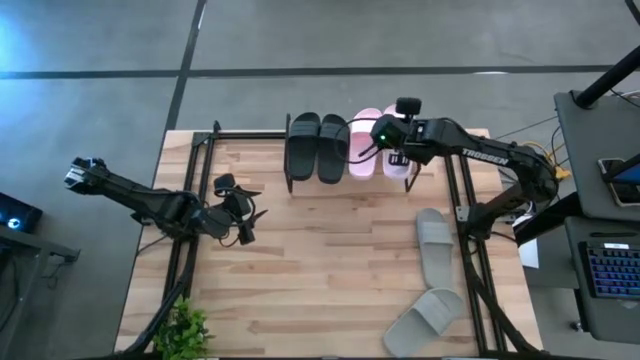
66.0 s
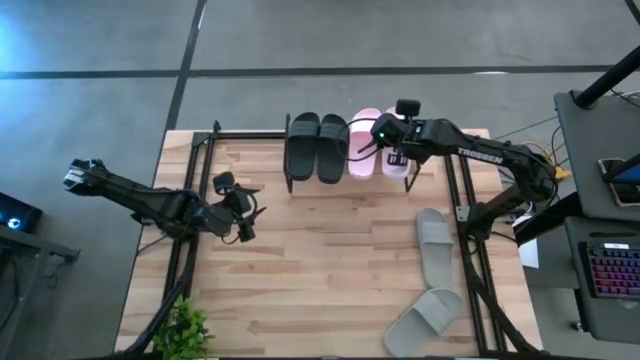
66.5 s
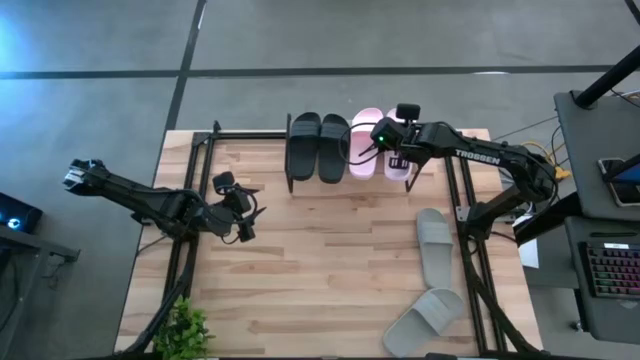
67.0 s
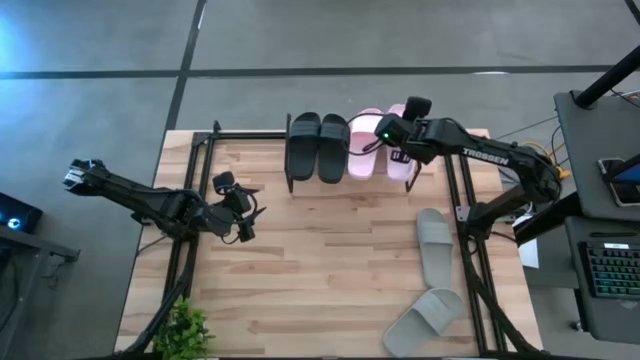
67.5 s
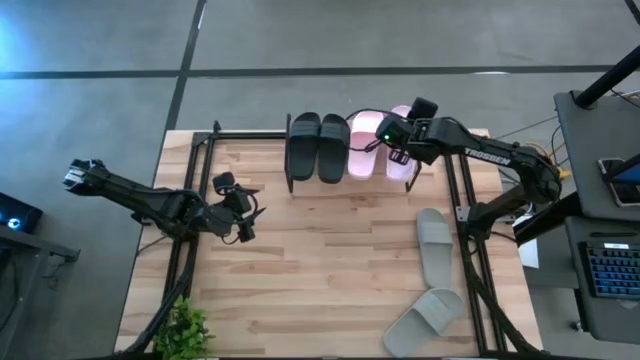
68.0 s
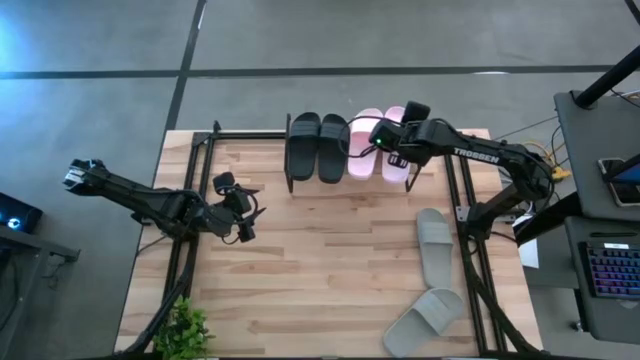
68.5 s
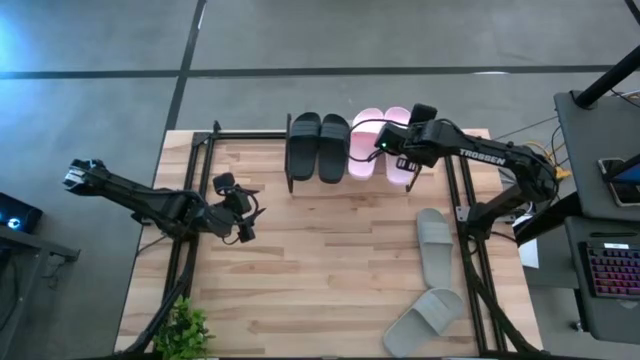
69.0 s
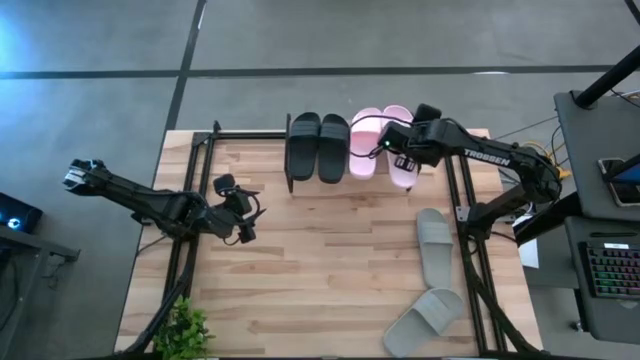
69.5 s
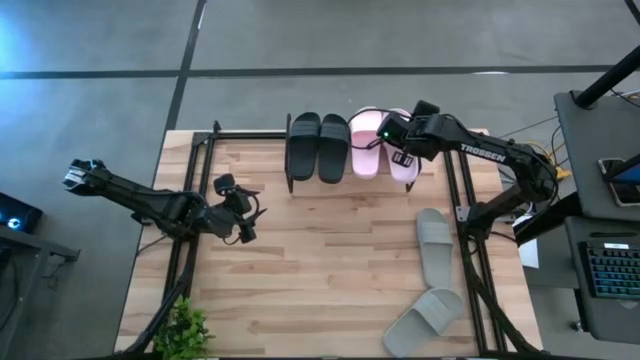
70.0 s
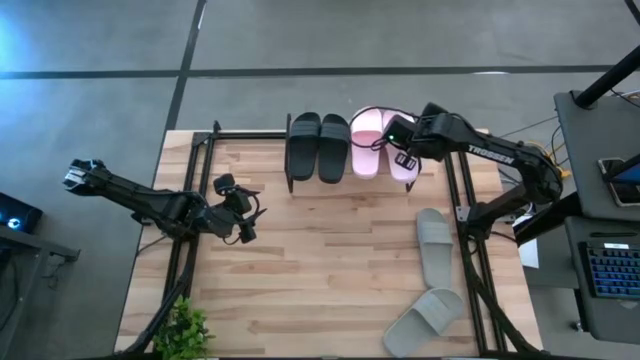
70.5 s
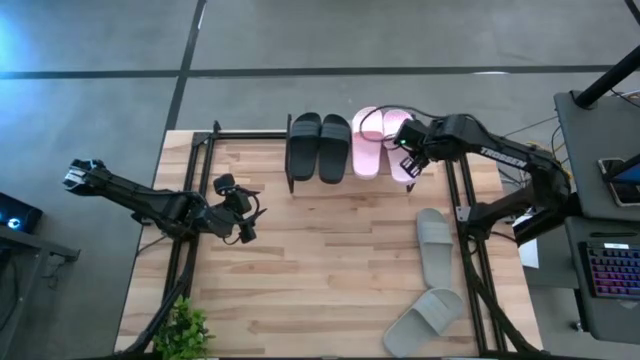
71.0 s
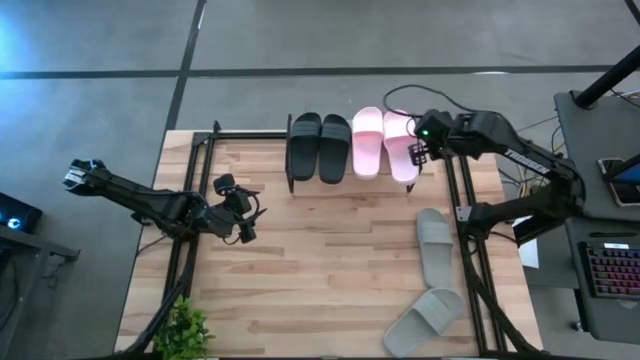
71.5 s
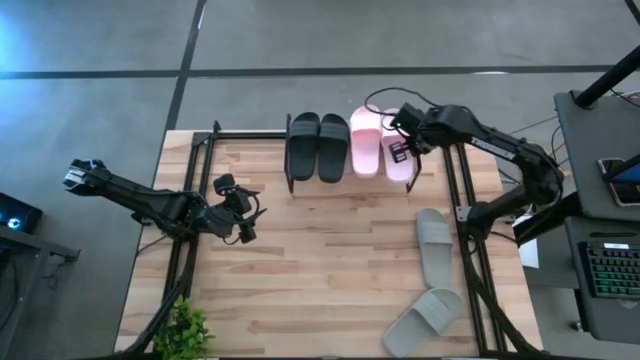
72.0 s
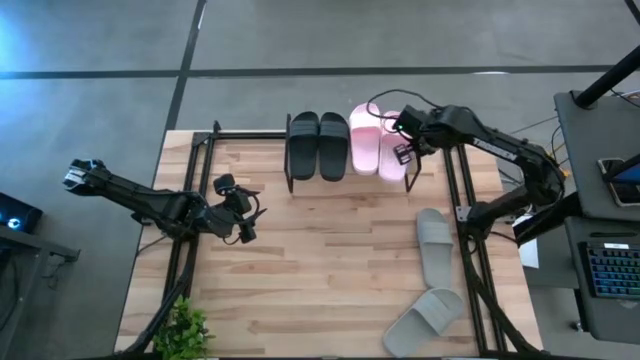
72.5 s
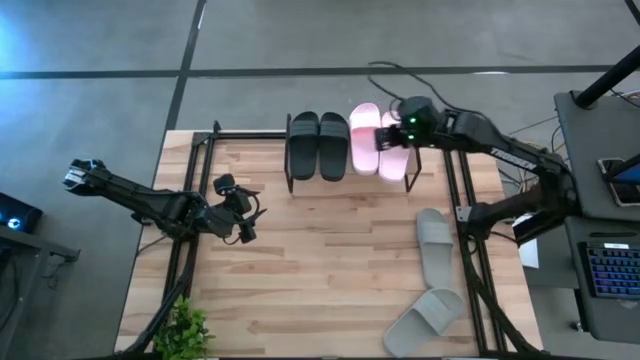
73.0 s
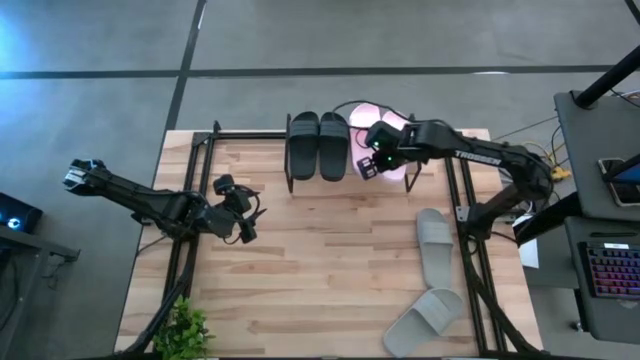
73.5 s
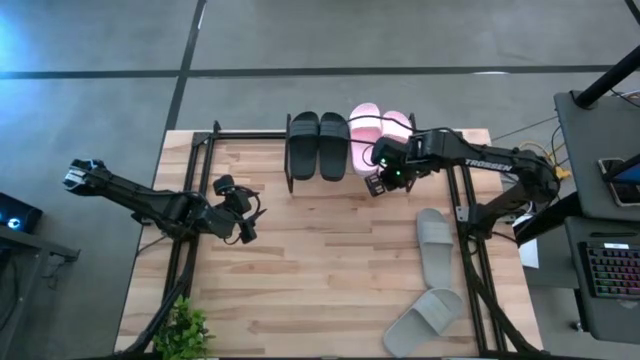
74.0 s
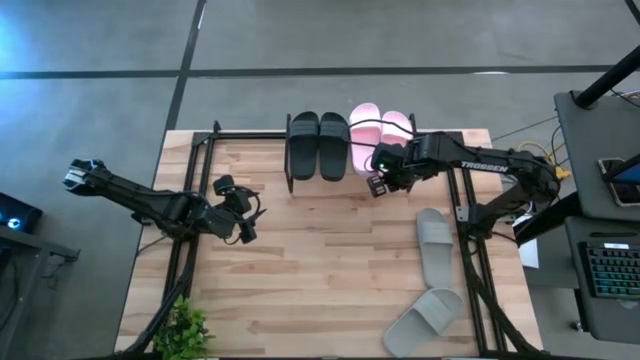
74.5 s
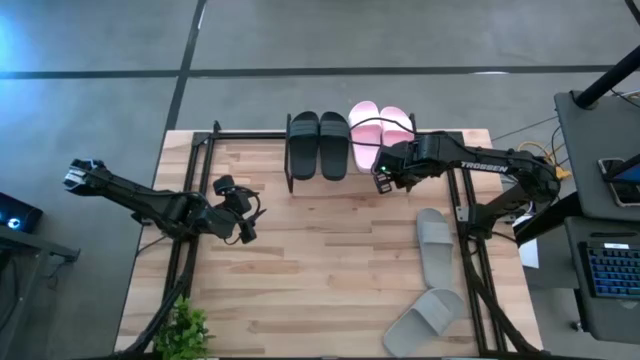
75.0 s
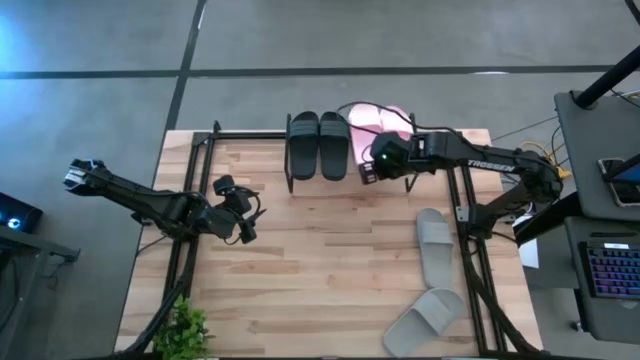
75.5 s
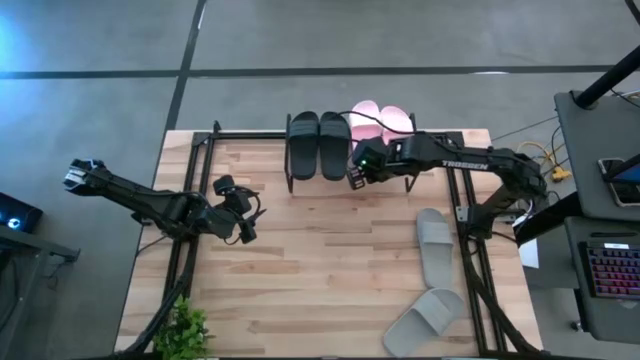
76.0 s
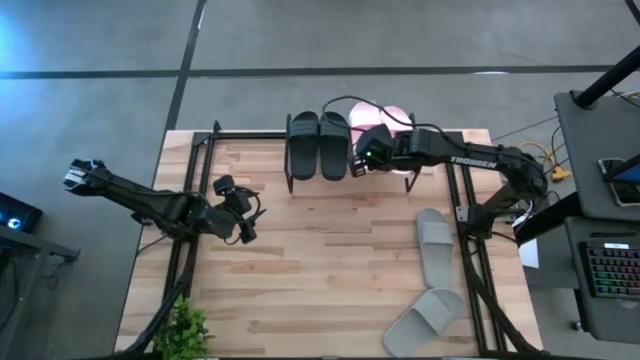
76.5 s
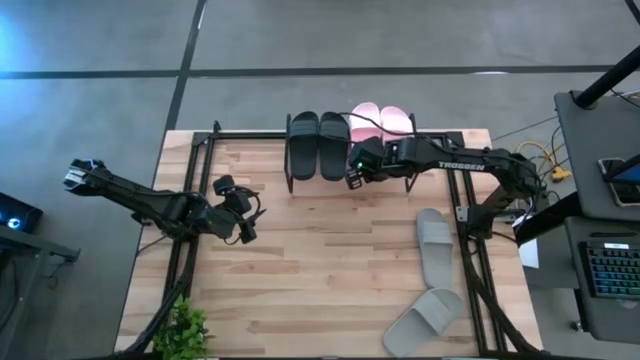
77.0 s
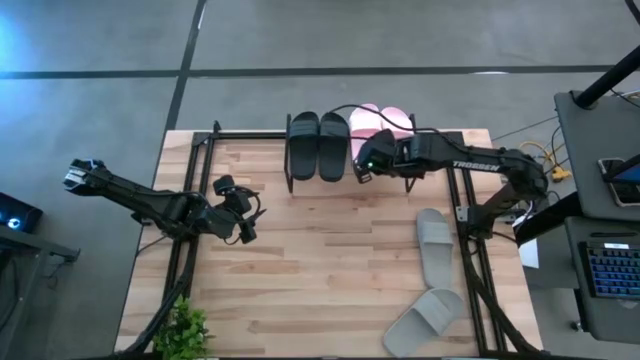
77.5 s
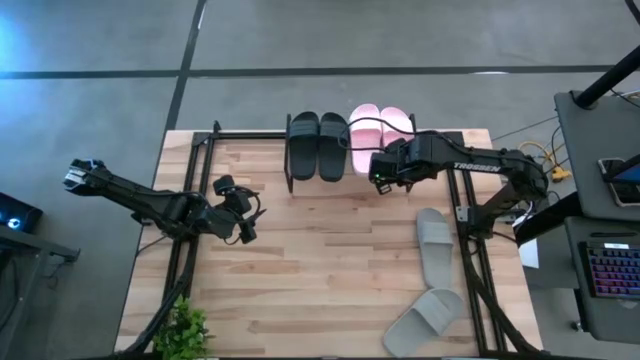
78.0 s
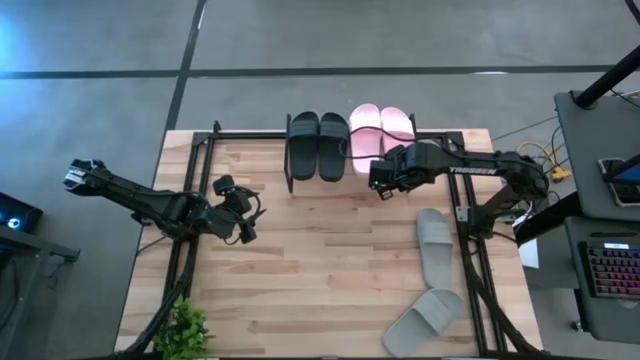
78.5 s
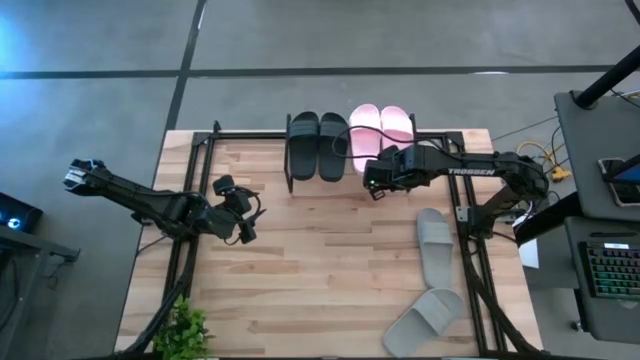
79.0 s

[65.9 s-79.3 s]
Task: Pick and place slides into the shelf
Put the pink slide on the shelf

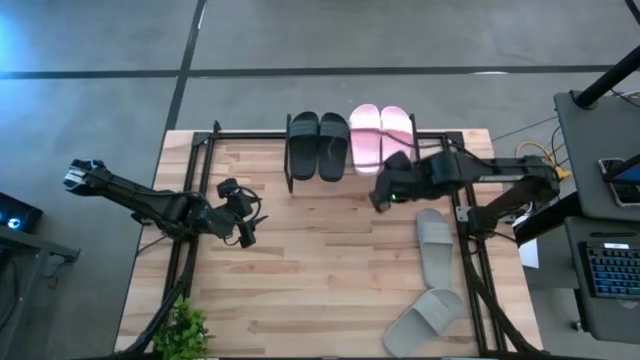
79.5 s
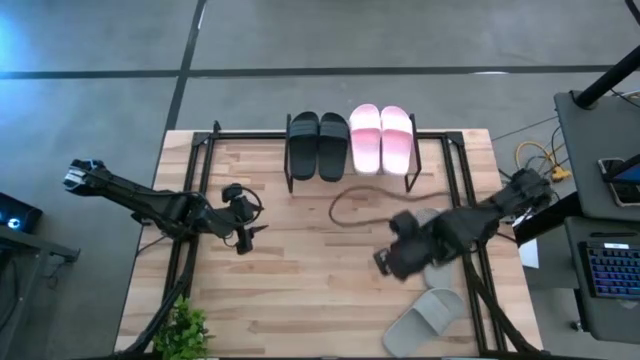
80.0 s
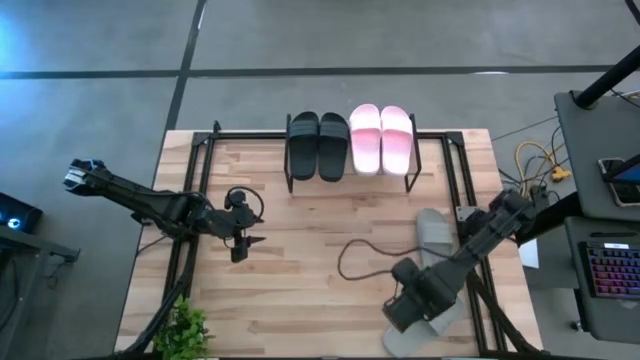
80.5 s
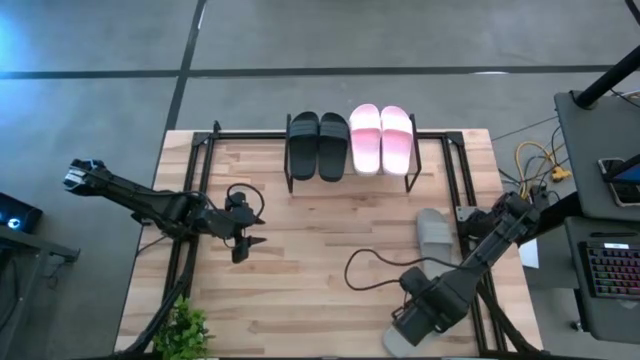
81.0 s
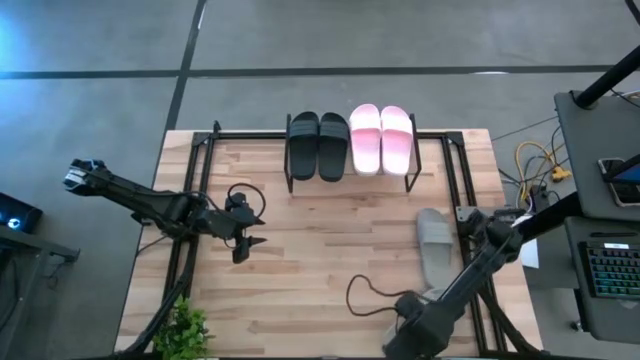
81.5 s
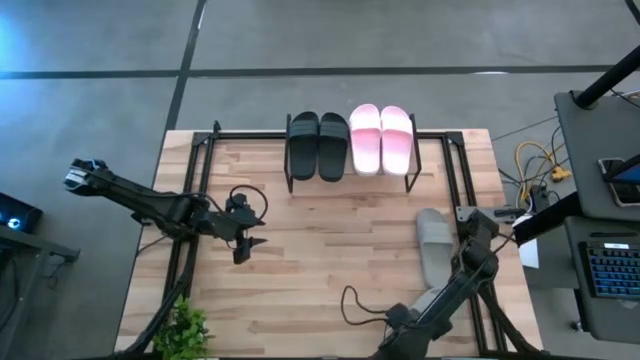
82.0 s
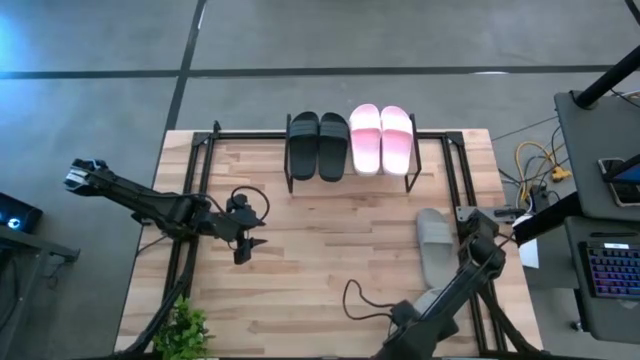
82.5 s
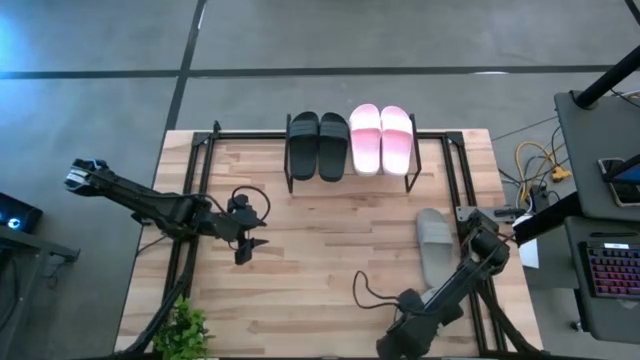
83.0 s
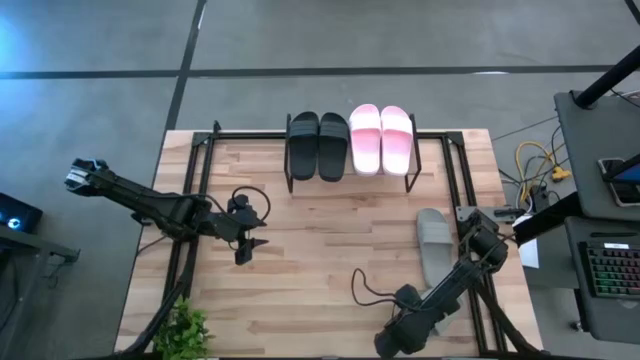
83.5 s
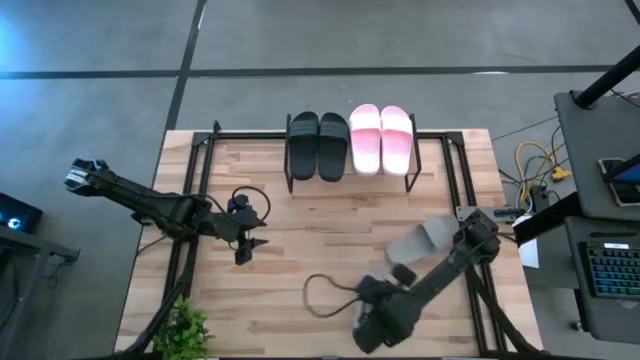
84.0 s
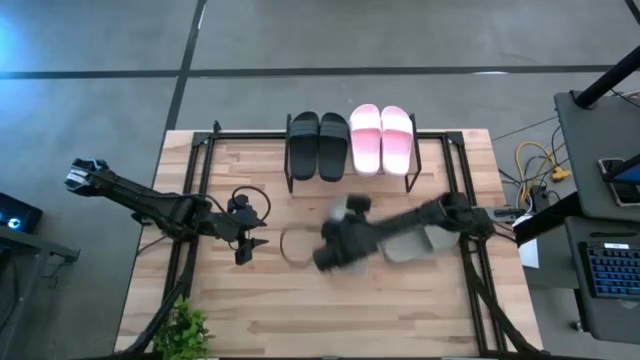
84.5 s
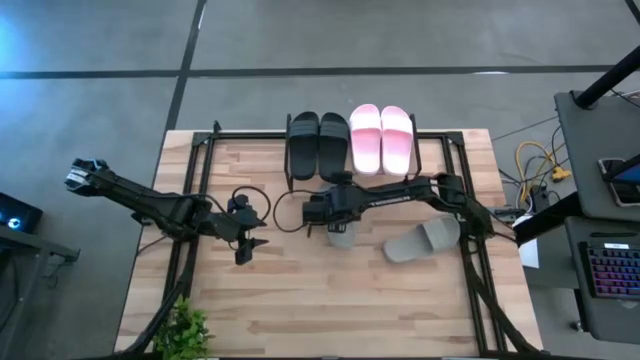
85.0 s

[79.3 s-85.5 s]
Prepare the bottom gray slide

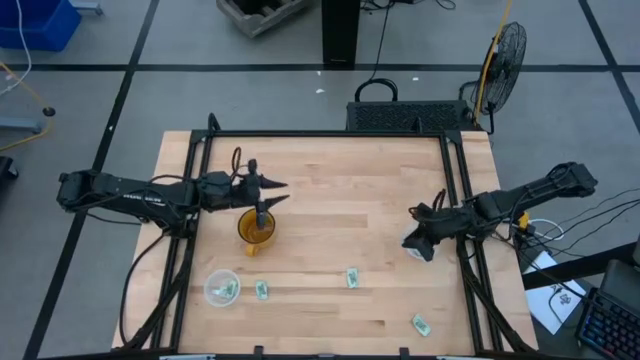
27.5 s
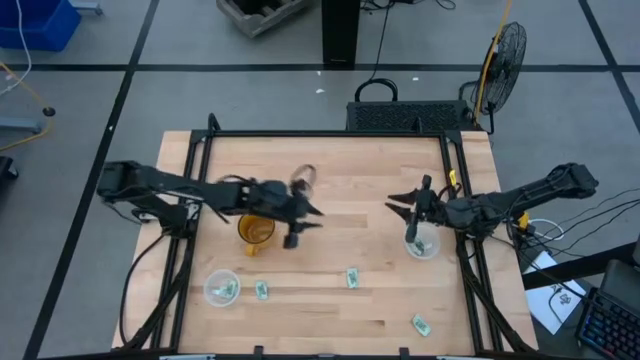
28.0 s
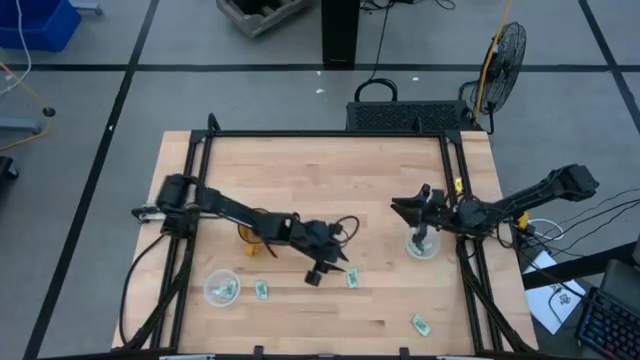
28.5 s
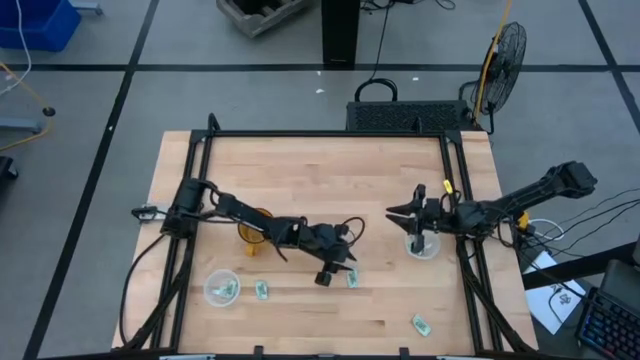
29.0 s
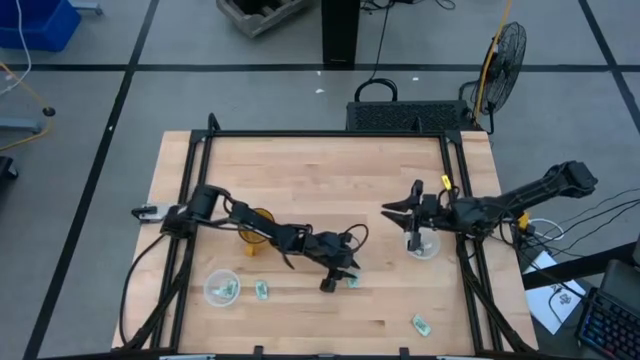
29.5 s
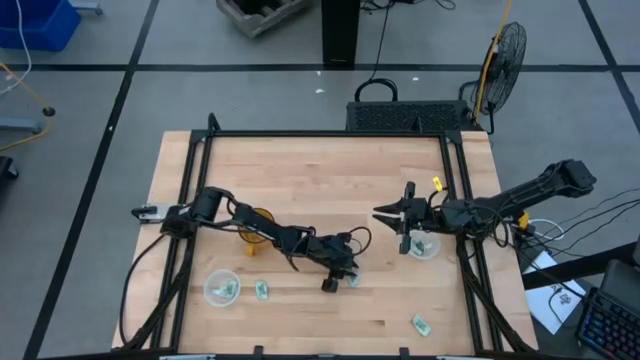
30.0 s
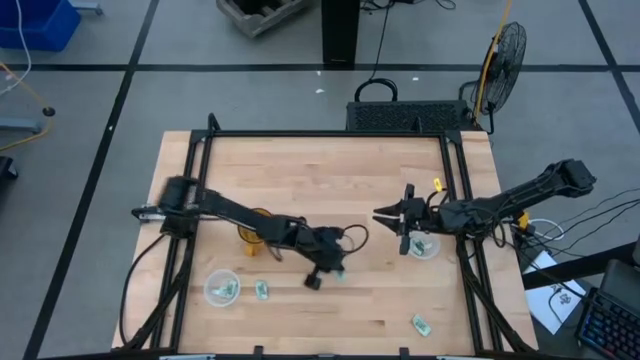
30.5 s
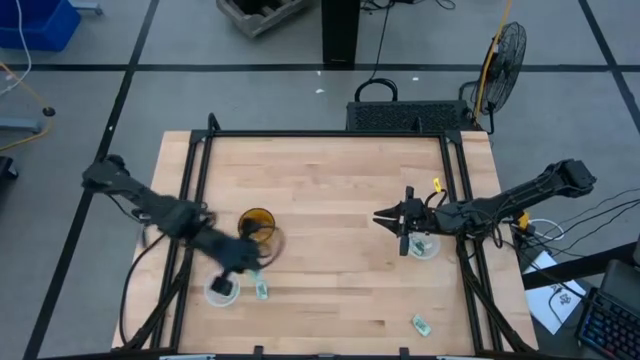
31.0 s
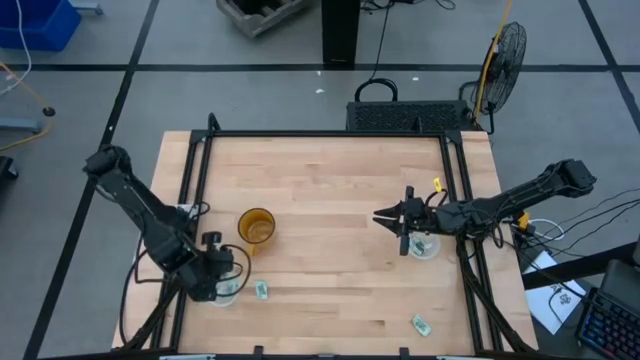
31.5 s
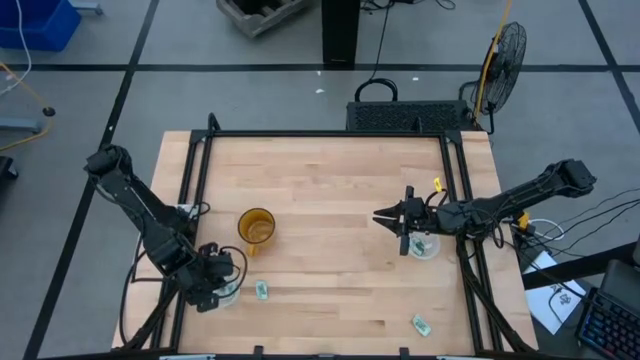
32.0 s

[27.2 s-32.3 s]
Task: Pick and place Stevia / Truvia into bins
Put the stevia packet into the left transparent container
